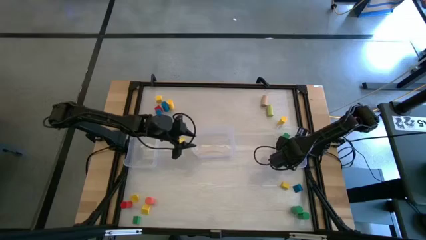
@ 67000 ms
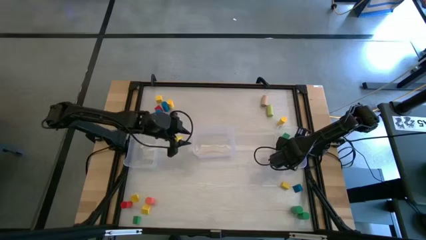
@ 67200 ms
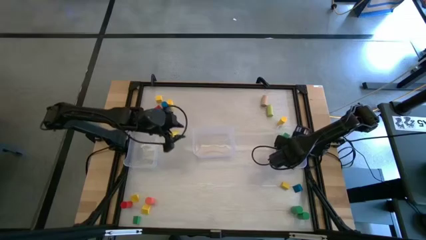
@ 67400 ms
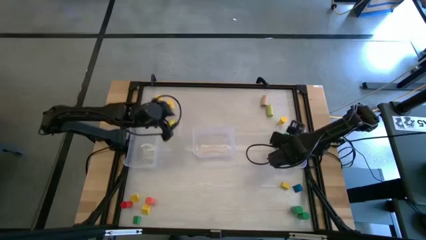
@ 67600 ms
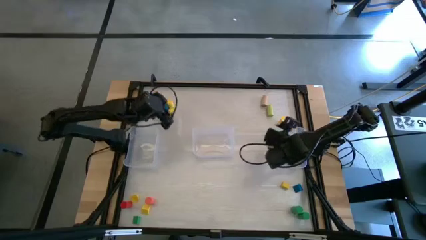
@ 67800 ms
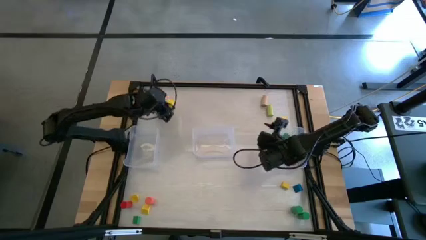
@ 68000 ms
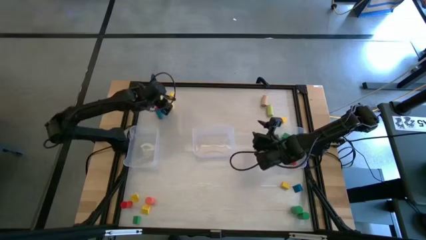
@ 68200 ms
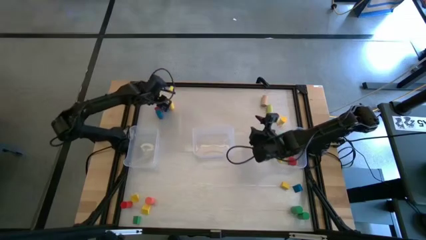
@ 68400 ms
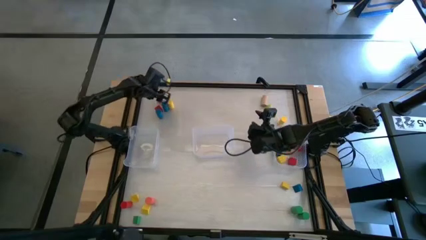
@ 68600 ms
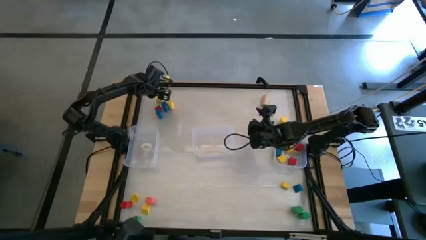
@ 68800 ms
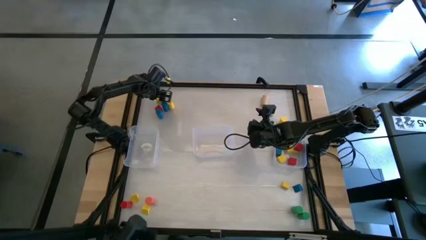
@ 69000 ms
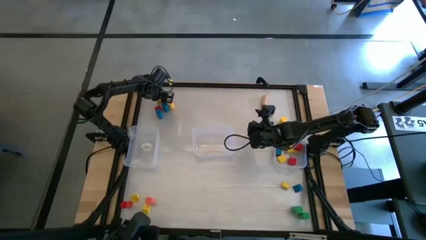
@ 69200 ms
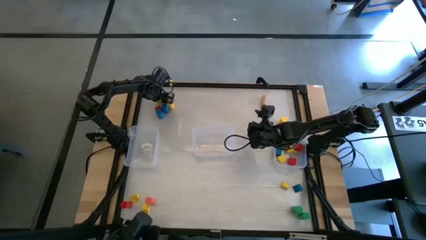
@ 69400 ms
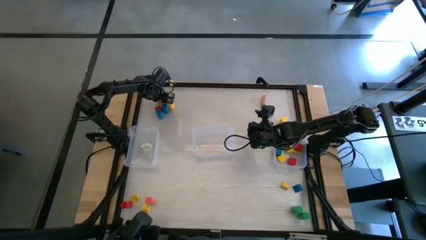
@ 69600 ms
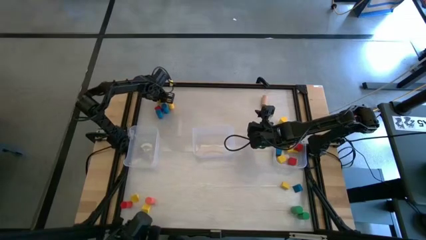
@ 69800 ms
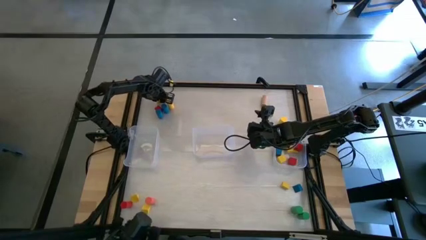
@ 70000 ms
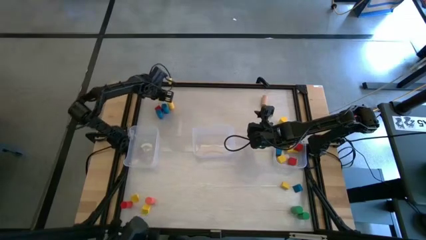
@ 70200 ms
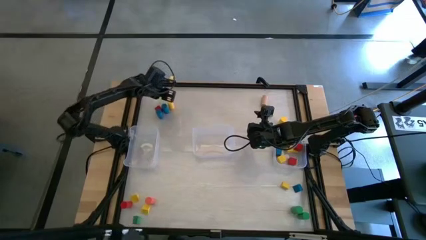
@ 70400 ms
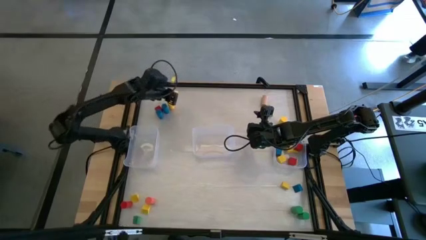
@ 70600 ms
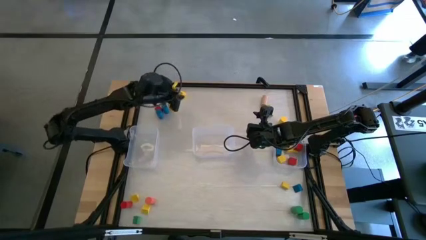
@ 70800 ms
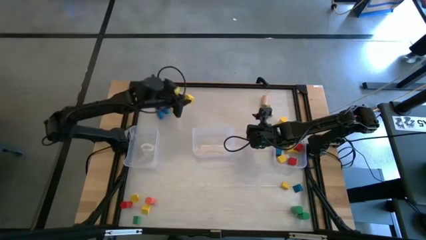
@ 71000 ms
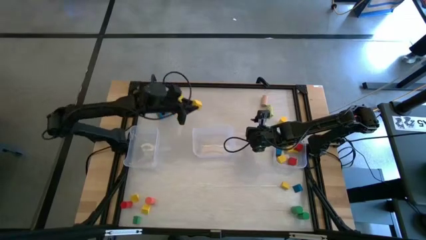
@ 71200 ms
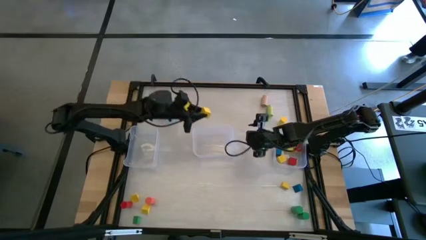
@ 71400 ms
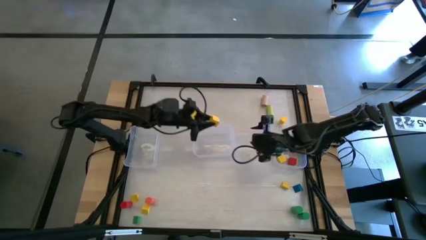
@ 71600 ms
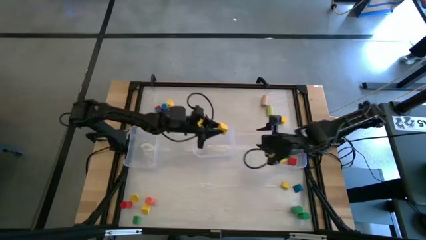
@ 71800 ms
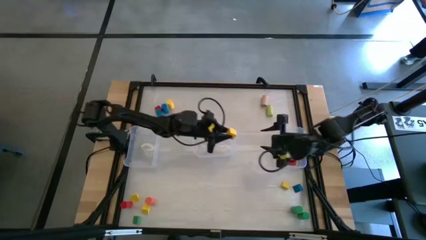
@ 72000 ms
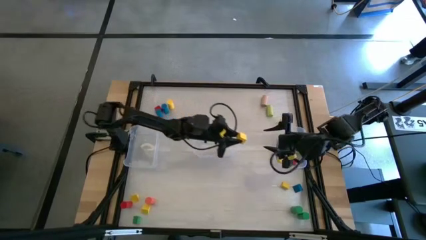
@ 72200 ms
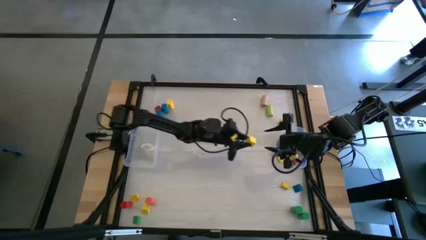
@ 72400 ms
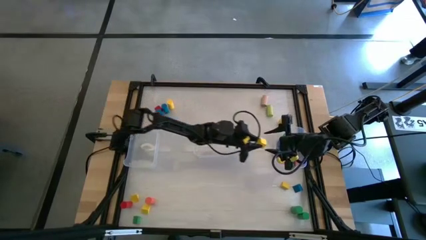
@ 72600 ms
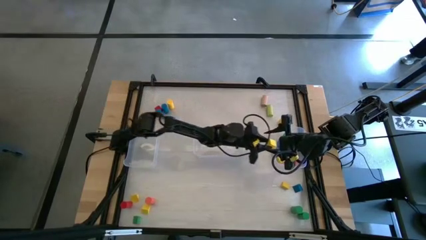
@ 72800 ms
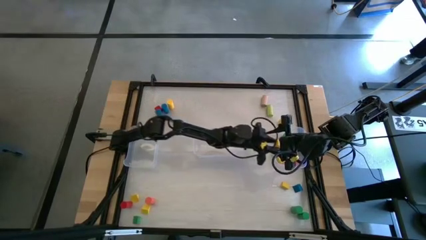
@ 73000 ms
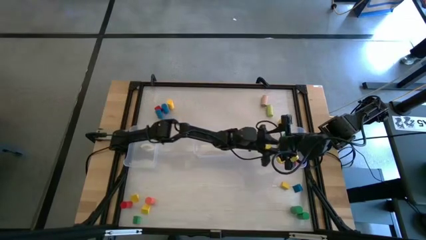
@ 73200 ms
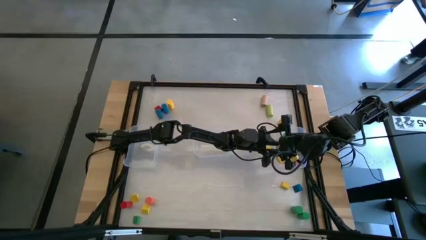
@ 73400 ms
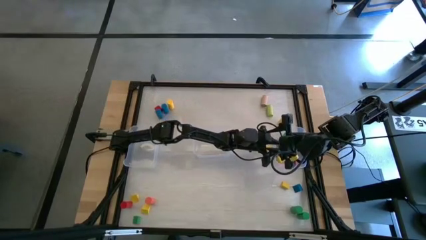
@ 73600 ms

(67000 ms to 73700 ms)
Task: Sort blocks by size
Put the yellow cube block into the right transparent bin

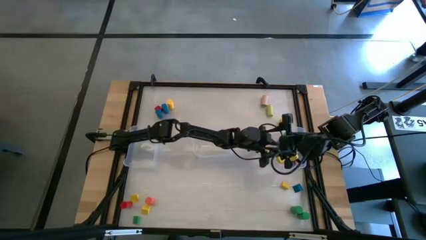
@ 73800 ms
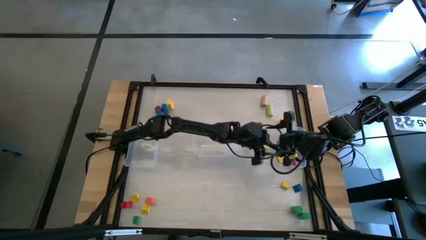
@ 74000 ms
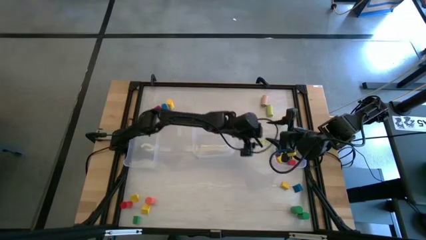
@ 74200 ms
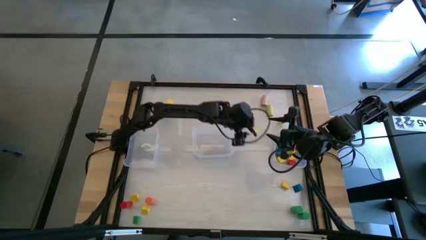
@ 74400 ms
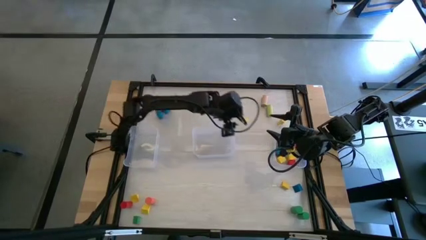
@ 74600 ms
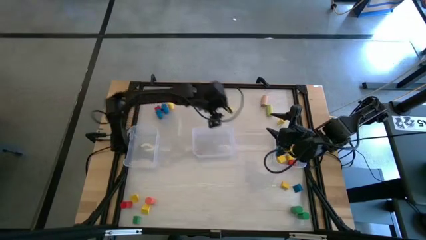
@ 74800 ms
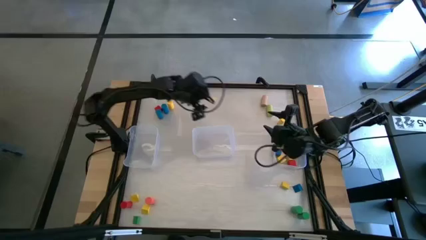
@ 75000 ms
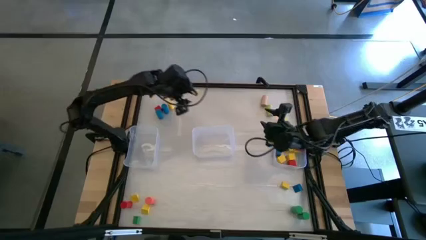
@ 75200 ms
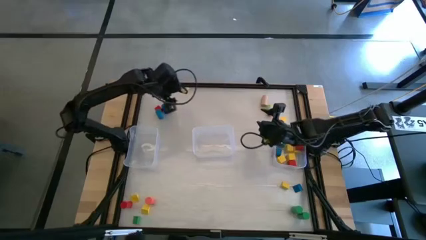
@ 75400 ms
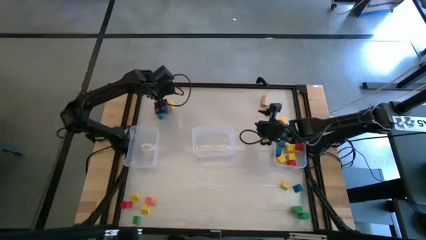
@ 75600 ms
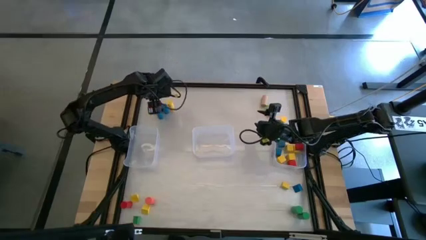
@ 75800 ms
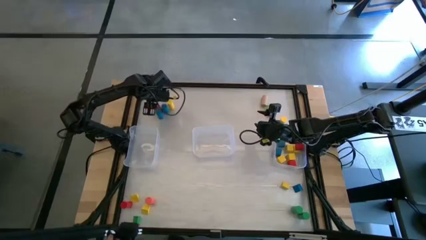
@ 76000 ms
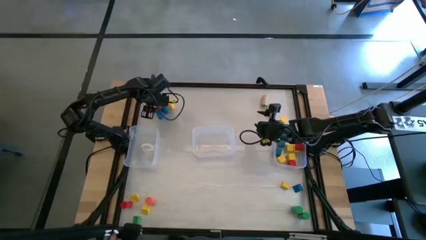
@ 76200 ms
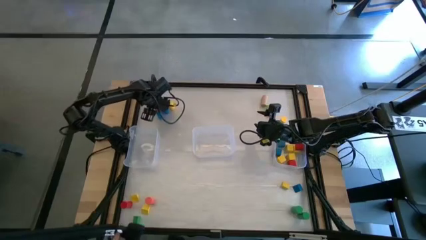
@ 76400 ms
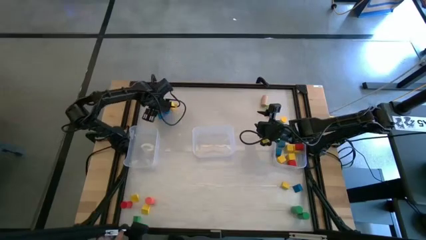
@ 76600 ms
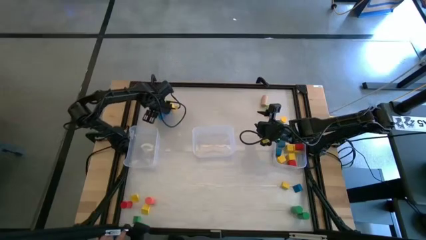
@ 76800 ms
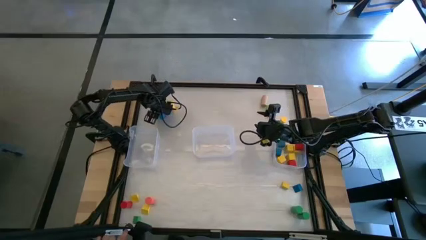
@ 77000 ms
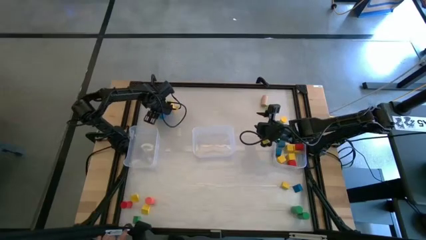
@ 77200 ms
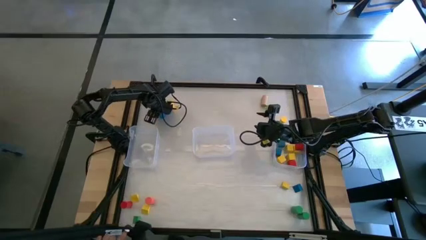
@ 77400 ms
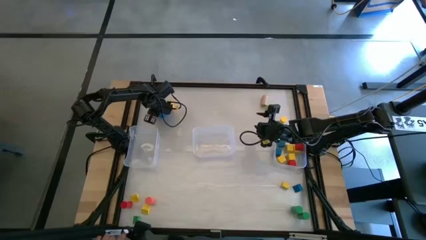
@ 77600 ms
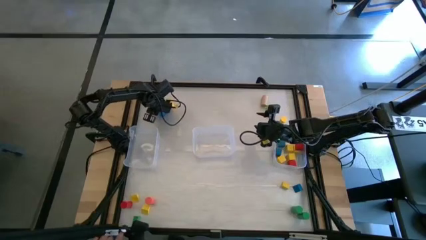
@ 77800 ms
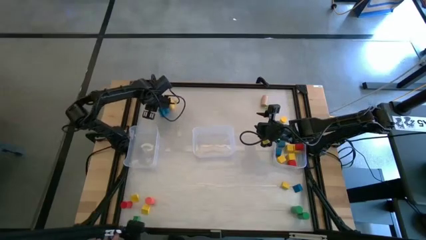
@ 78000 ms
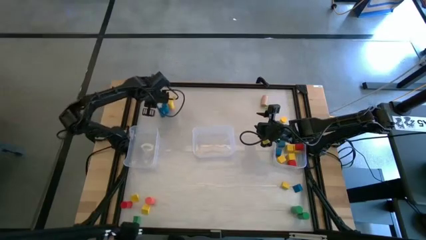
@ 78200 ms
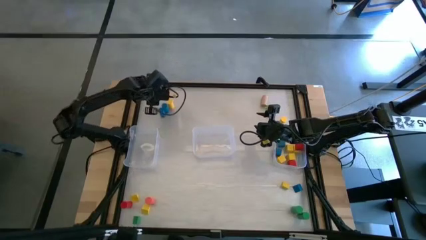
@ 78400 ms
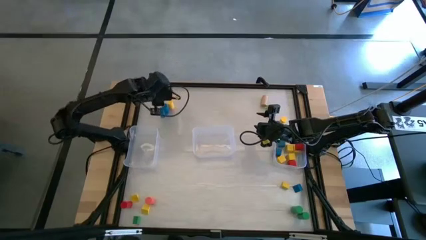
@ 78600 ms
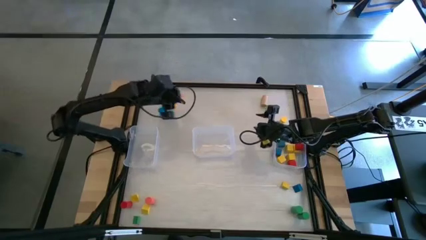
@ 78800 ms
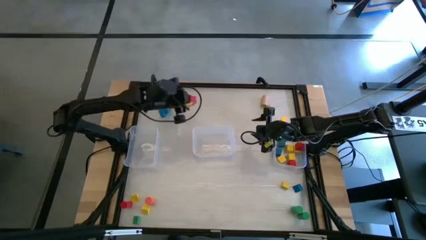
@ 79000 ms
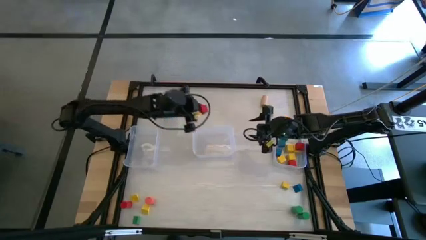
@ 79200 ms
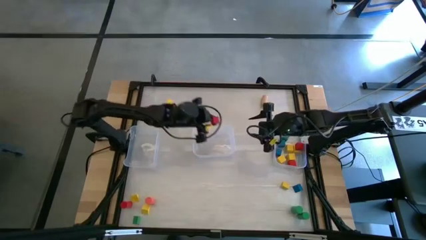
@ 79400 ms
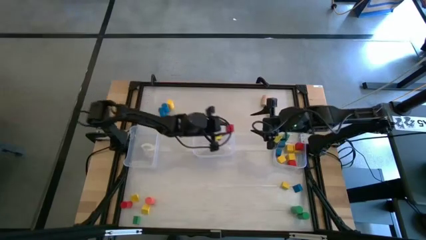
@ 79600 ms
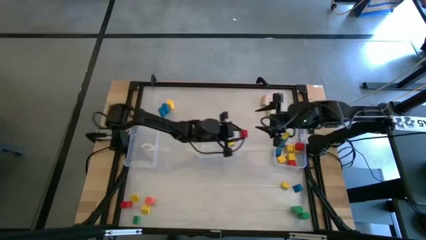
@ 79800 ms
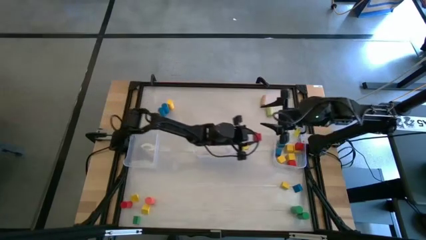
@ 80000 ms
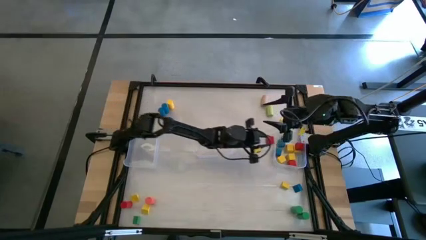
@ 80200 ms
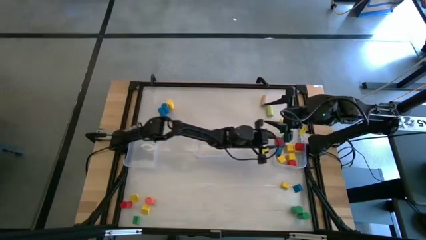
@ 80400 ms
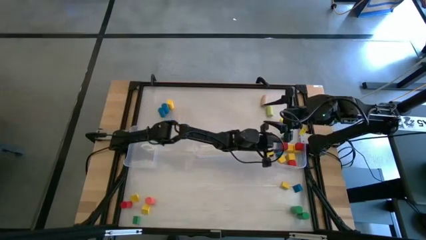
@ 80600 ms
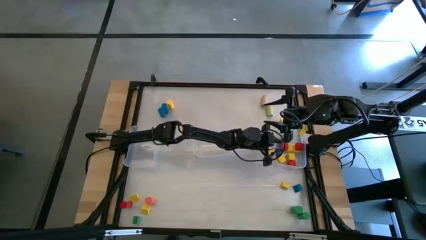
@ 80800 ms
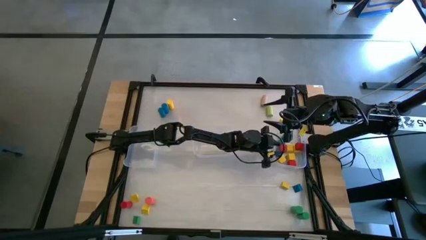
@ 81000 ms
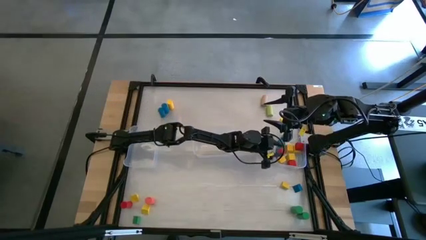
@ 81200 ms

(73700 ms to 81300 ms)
Put the red cube block into the right transparent bin

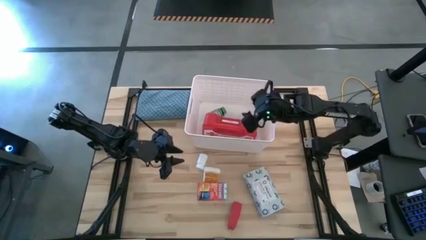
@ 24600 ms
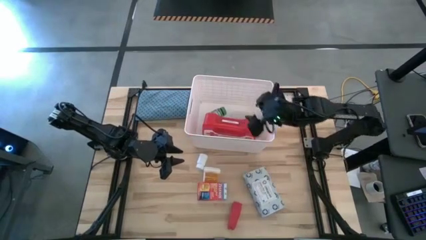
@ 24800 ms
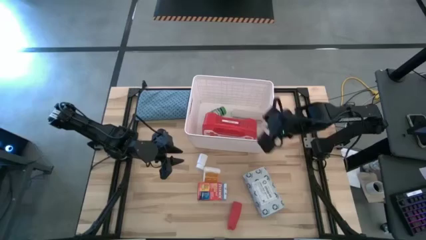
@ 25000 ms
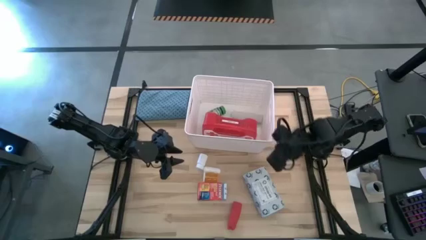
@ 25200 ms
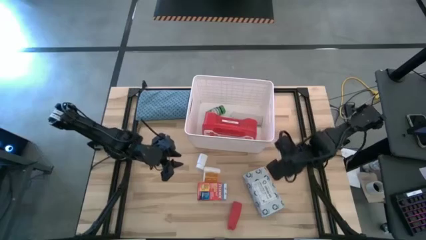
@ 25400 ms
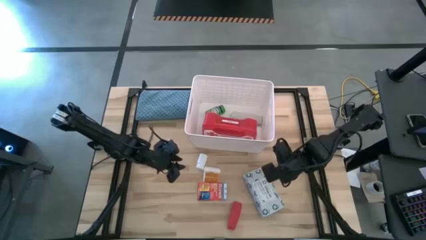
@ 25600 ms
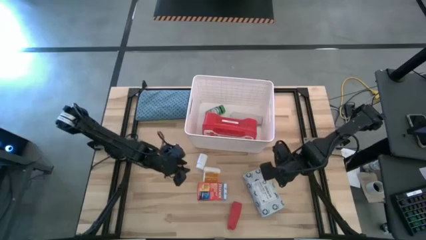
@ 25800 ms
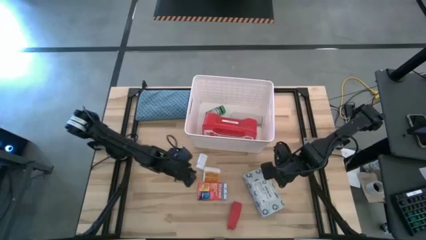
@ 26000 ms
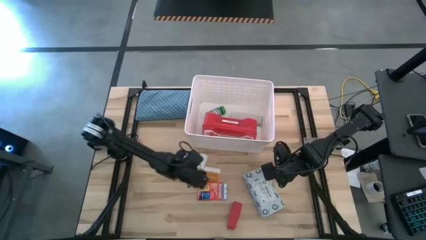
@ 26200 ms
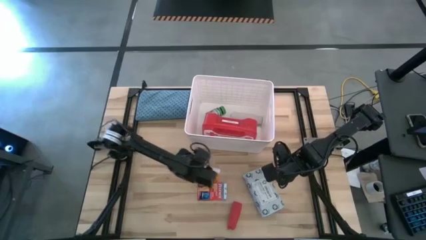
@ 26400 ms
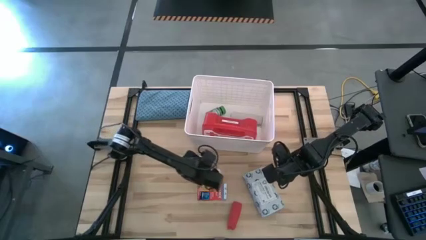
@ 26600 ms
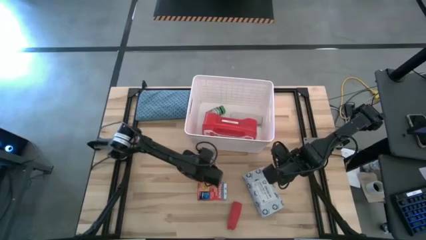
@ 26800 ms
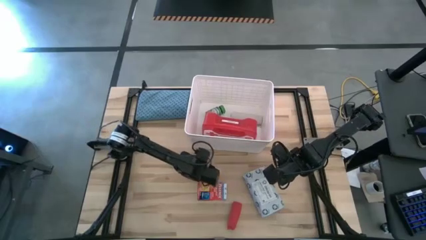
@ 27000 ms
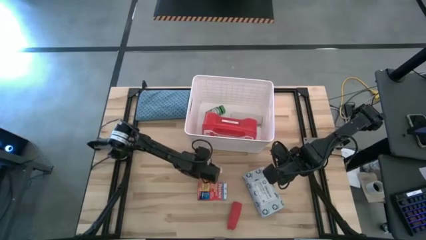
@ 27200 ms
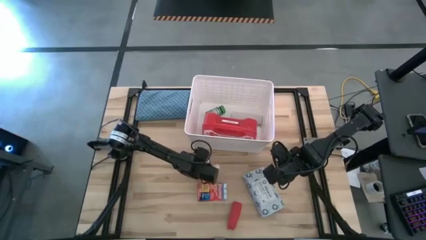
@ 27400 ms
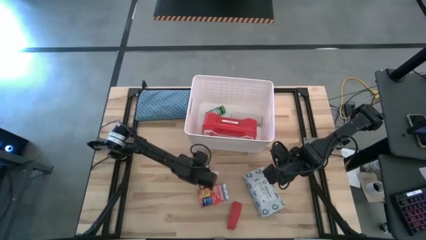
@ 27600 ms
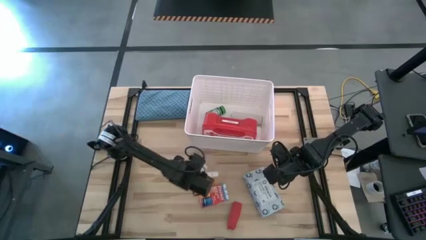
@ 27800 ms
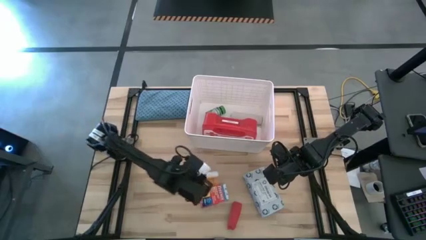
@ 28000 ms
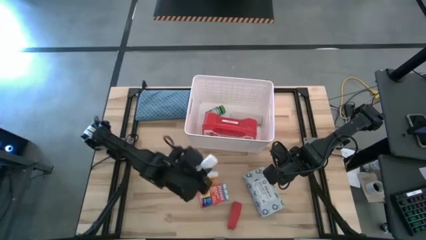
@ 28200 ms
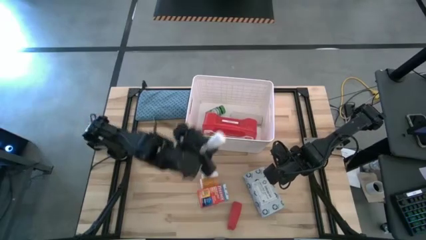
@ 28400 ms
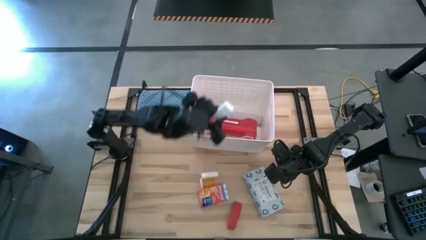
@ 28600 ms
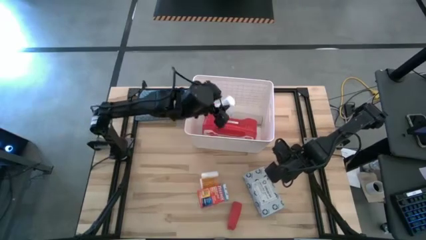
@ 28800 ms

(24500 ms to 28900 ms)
Task: Pick & place medical supplies in basket/bin
Put the white medicine bottle into the white bin
